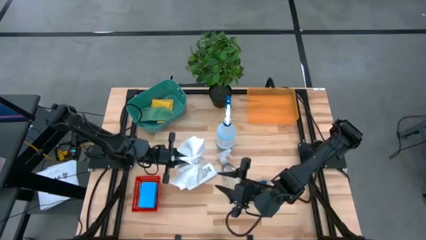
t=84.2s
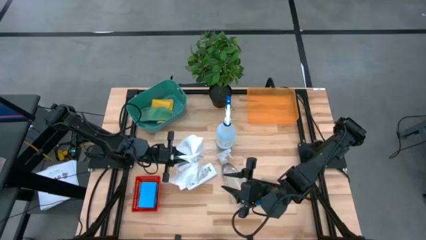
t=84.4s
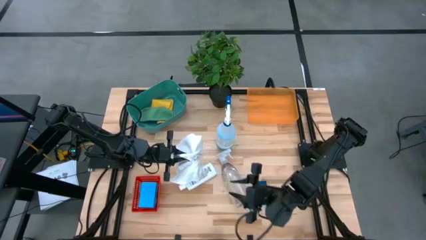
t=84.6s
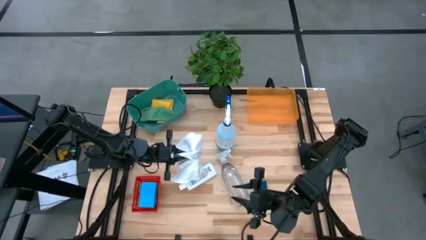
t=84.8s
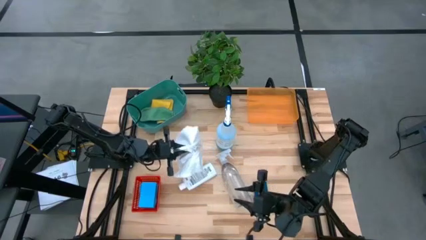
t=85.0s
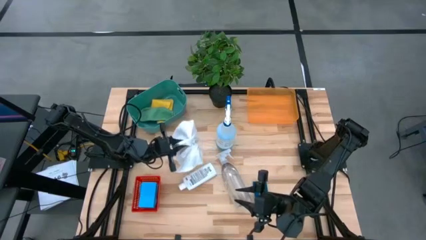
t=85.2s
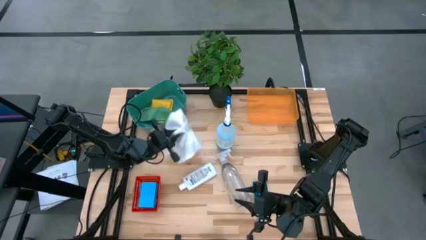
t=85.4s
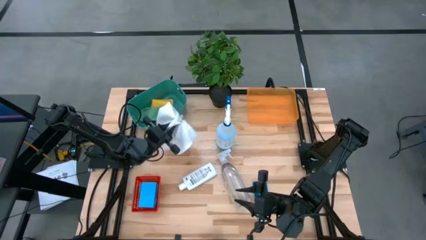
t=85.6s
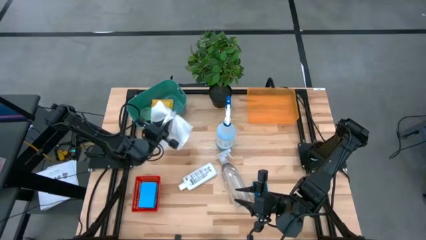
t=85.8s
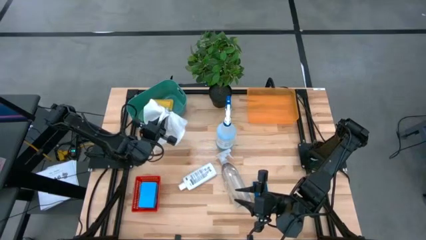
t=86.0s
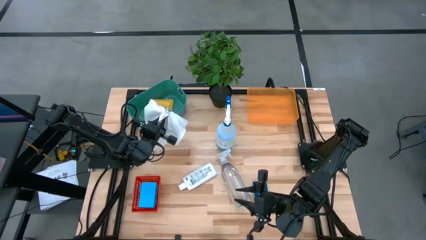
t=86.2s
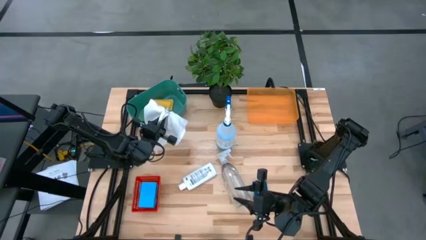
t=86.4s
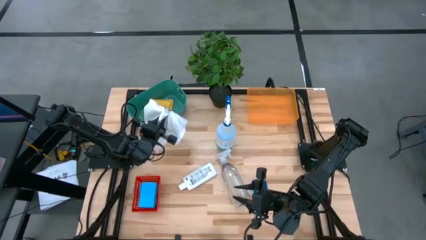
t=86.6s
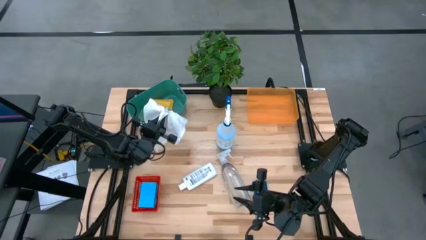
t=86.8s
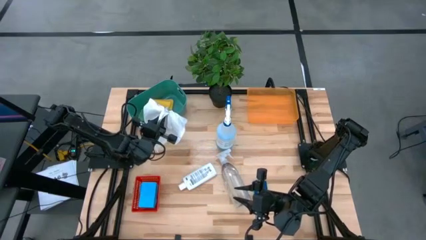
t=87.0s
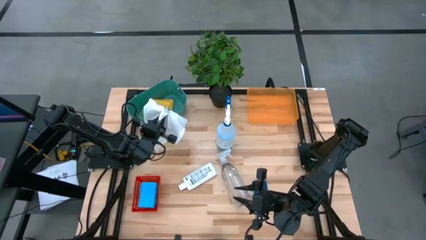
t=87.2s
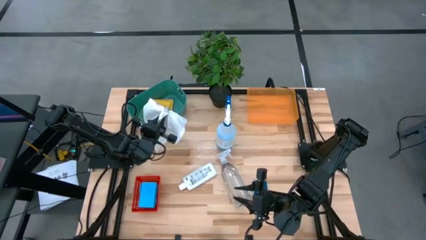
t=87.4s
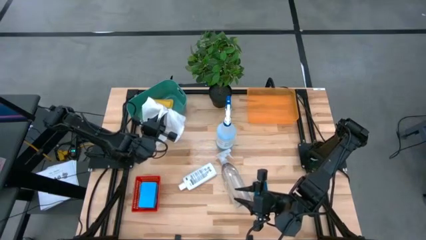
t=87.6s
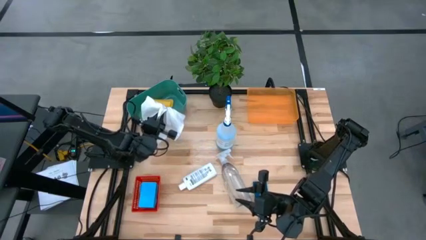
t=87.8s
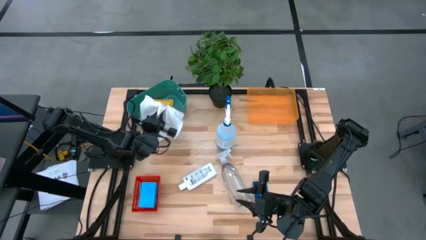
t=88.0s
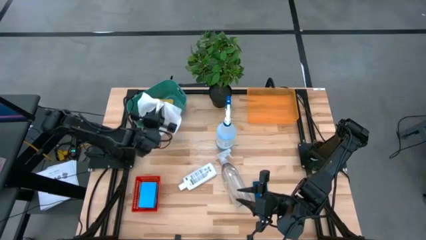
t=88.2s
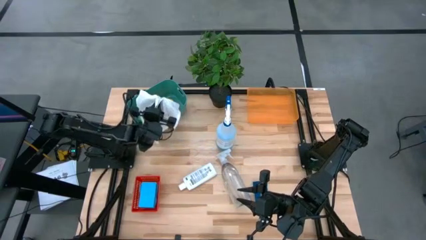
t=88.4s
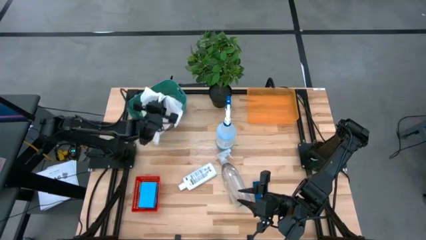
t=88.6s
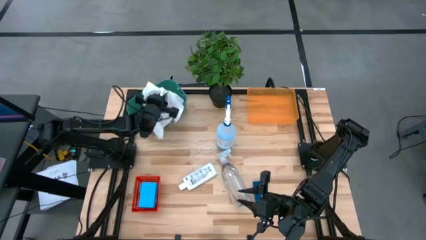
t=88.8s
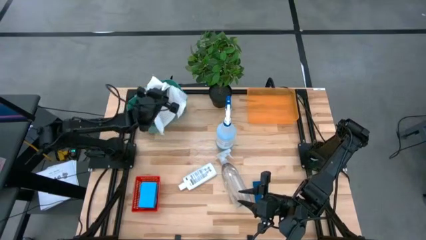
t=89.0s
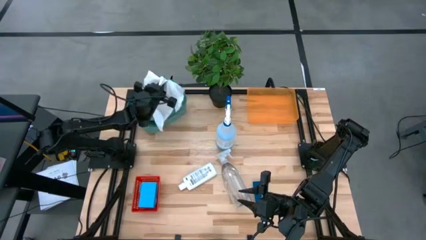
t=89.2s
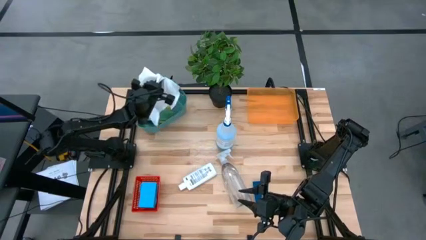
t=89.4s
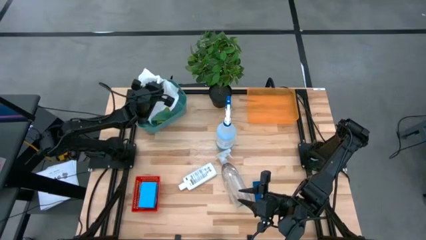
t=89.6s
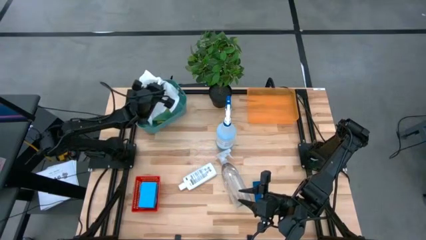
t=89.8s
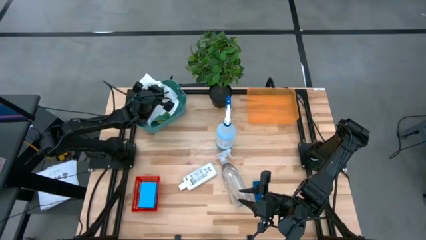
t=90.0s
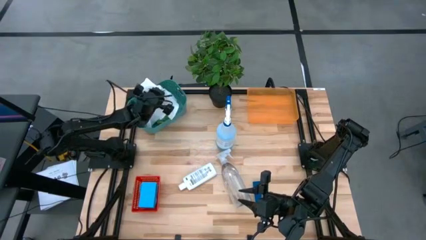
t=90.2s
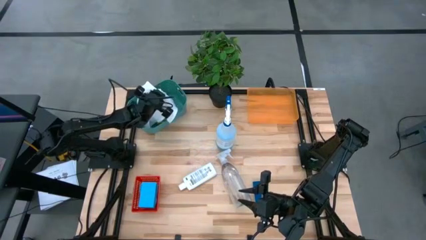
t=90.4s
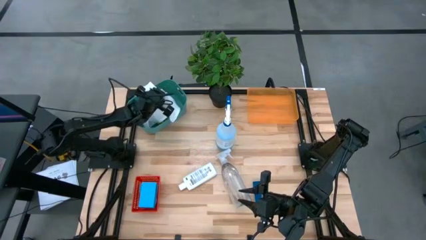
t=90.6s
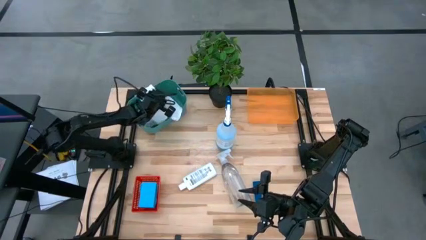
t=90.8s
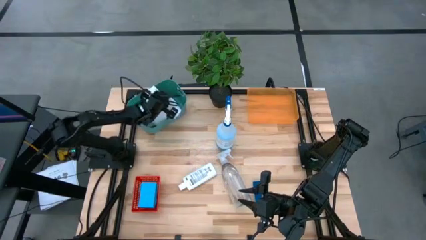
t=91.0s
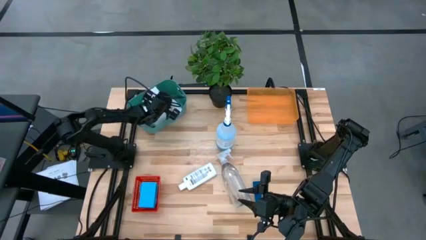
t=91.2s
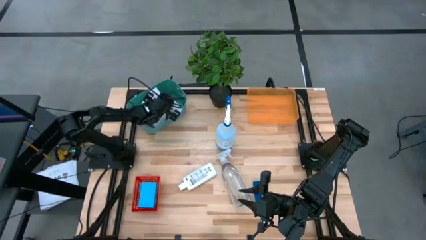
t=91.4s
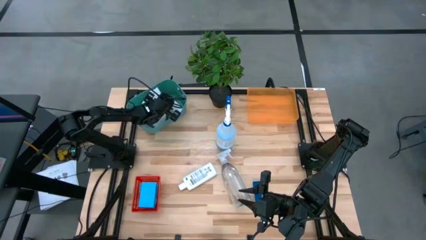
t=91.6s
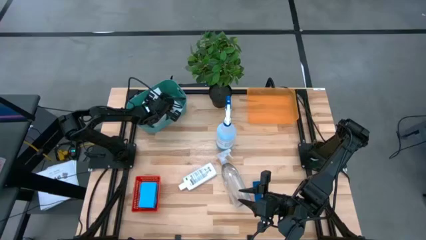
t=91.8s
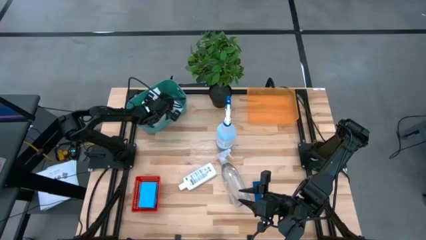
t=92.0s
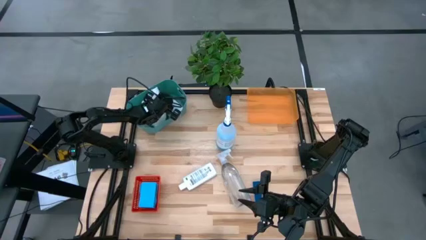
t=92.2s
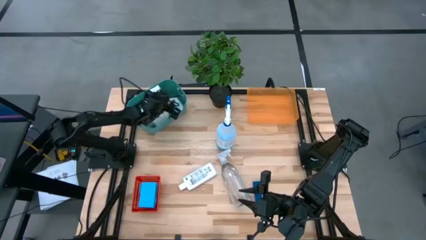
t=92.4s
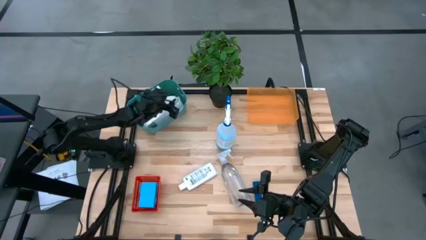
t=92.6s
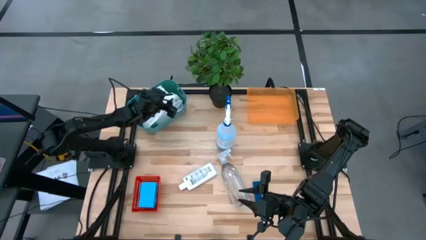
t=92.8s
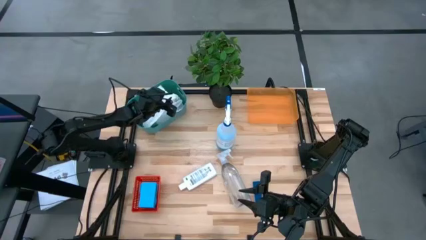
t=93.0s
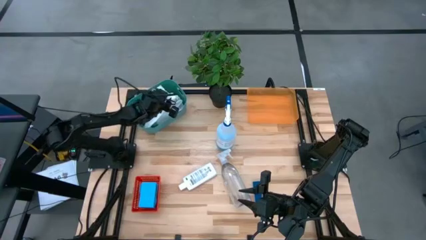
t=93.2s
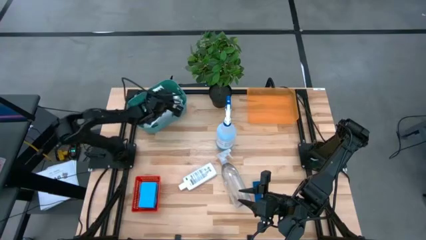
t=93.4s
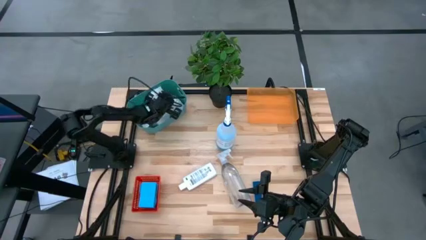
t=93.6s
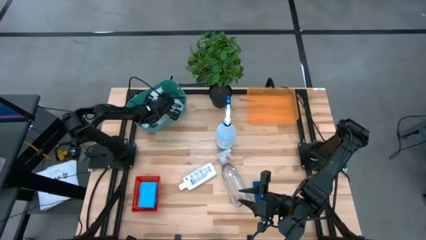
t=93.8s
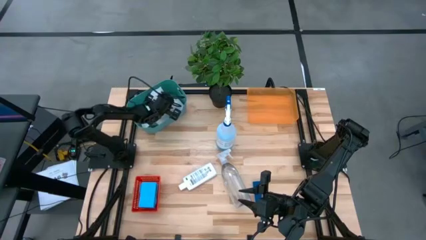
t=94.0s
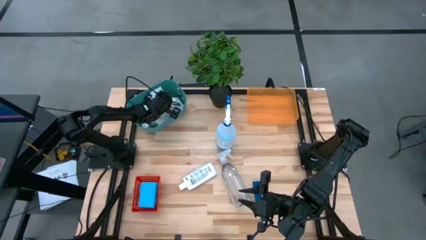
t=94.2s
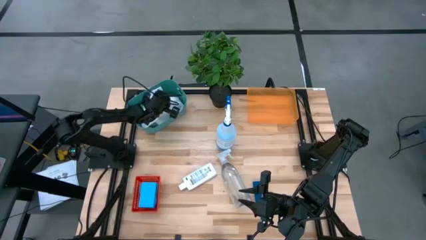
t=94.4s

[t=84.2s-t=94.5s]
Task: Pick & Place Kitchen Items
Put the white towel into the green bin

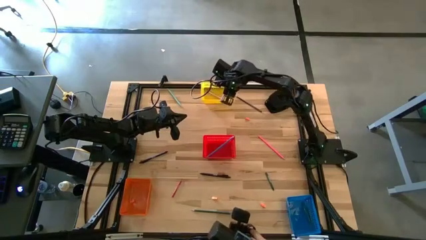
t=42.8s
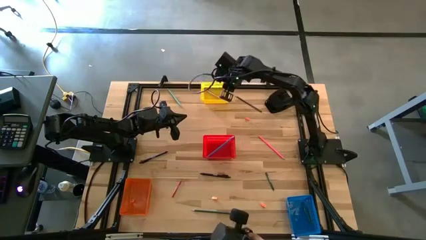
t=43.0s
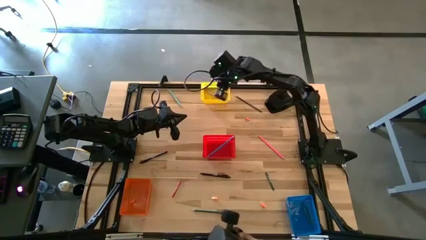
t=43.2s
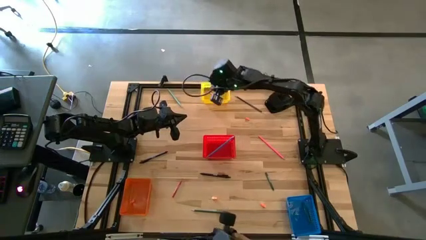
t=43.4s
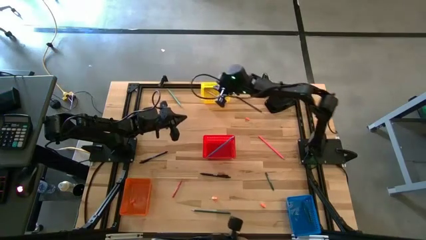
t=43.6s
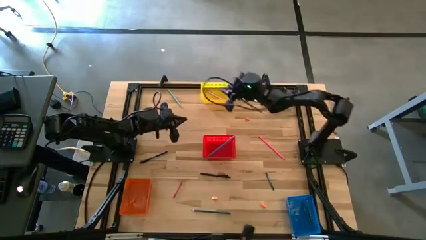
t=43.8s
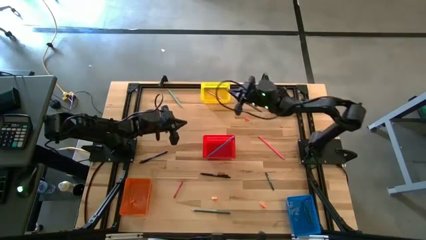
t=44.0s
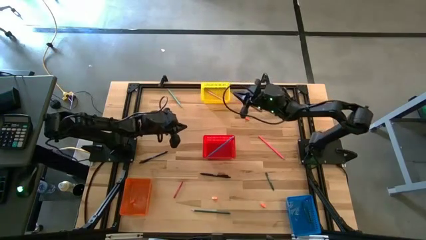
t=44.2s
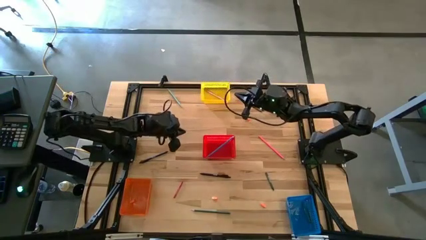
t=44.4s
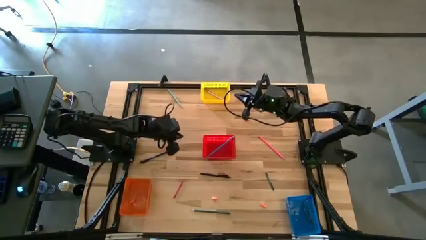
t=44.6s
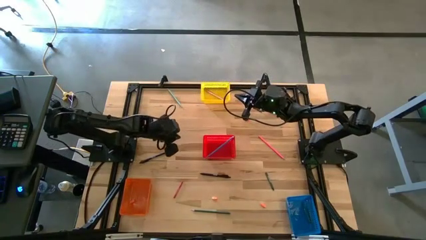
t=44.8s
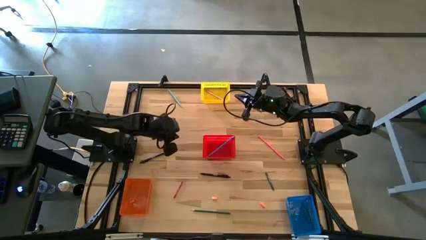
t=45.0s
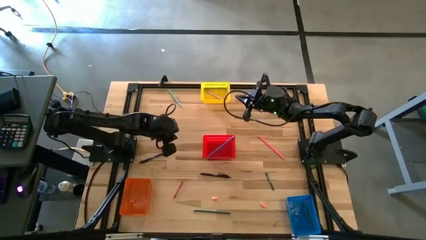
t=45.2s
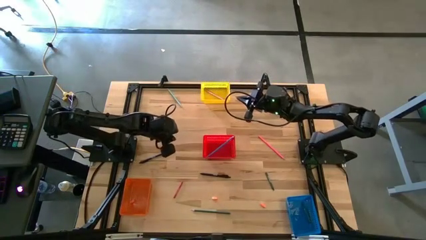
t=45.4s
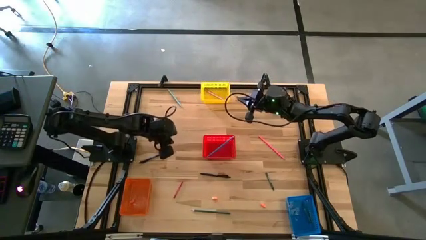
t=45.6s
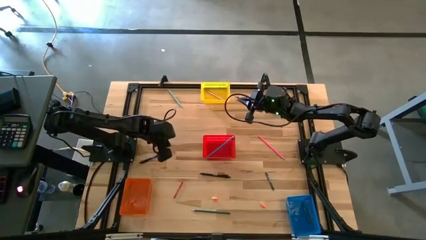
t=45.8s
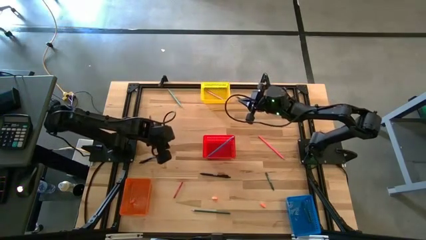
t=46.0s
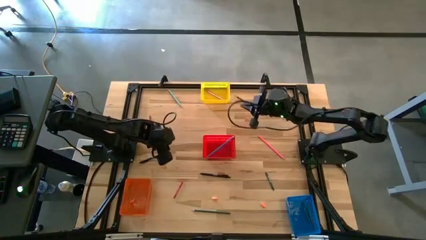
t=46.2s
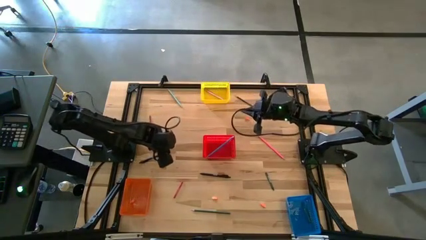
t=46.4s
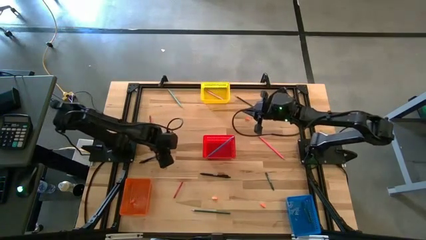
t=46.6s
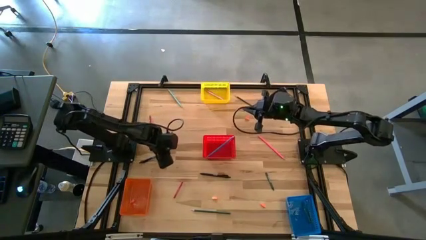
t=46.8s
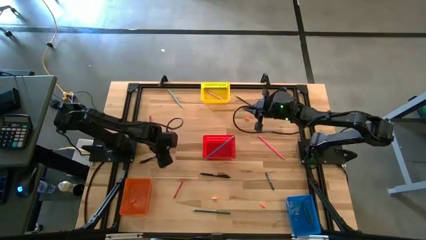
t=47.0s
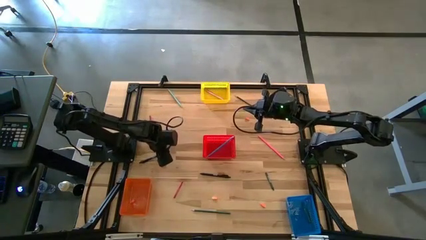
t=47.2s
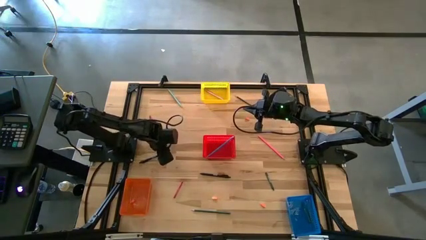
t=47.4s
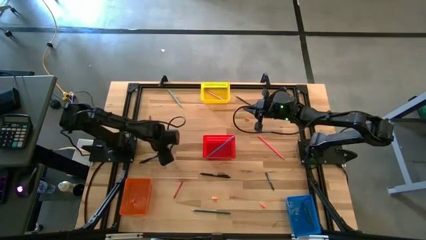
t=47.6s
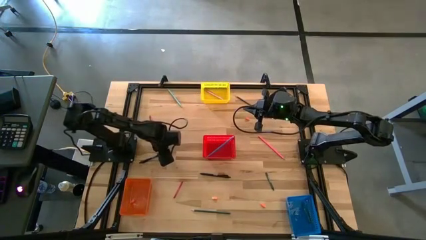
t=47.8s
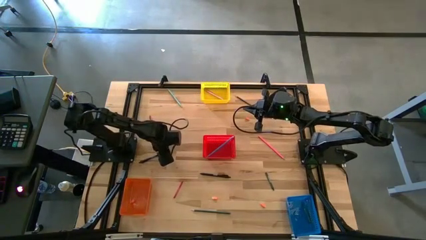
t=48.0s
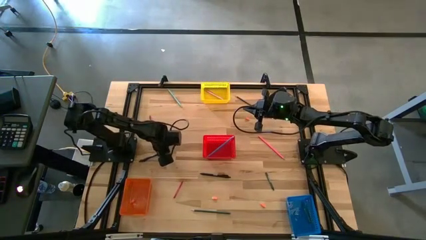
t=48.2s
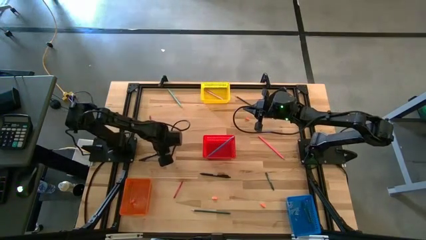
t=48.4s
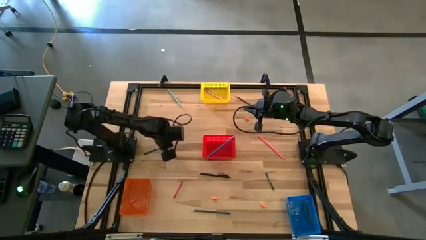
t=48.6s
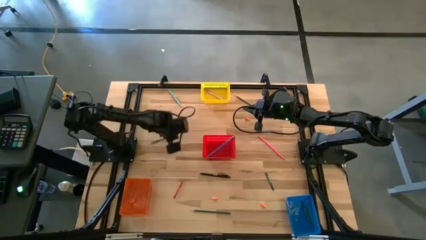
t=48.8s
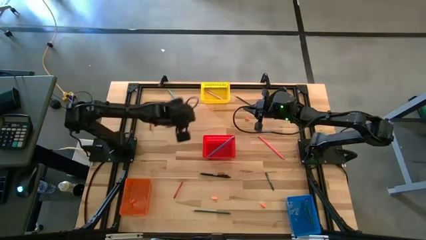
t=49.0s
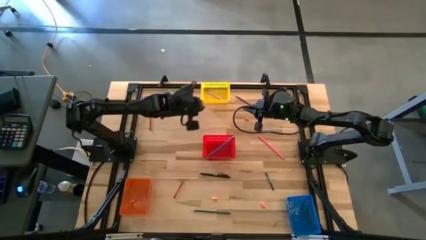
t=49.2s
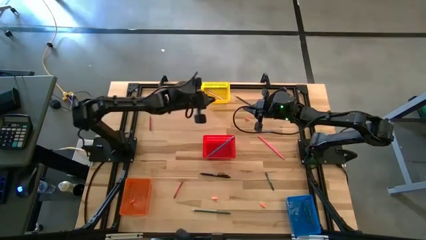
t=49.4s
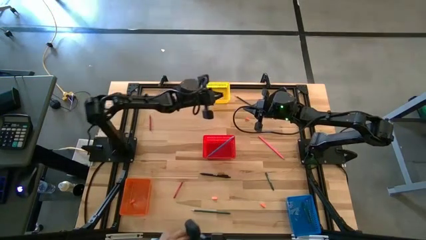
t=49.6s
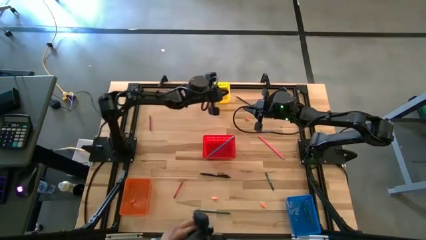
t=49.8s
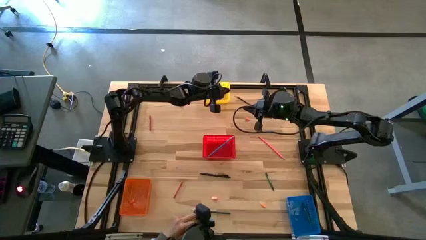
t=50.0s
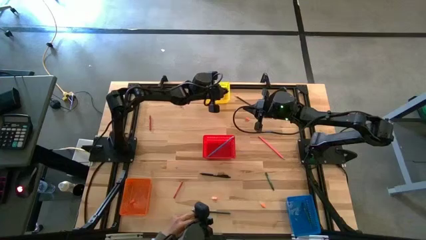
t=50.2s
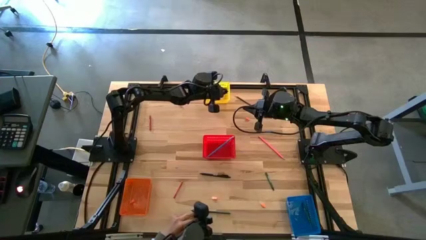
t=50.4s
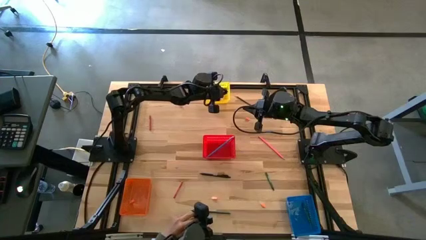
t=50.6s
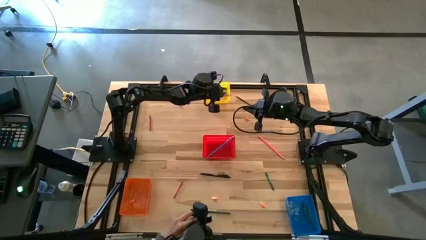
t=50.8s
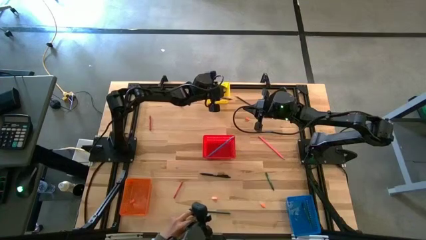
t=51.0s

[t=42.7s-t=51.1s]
Task: Sort crayons/erasers/pens/pencils in bins
Put the black ball pen into the yellow bin
